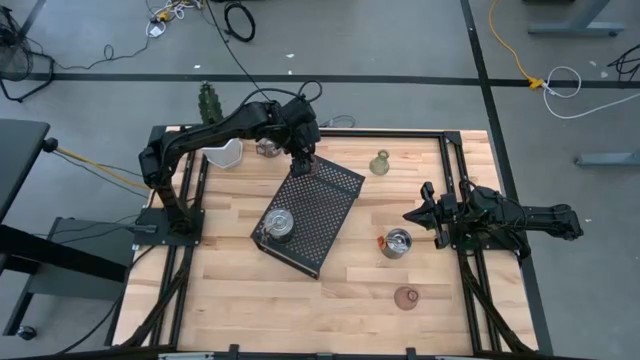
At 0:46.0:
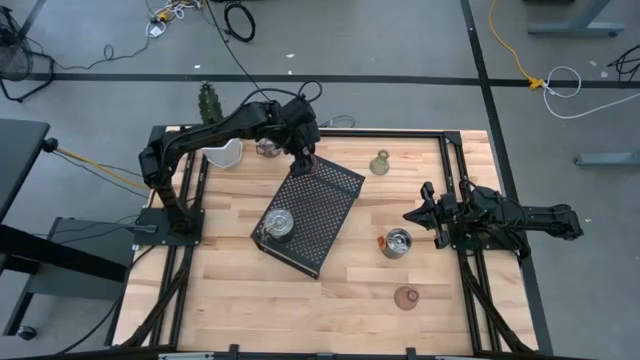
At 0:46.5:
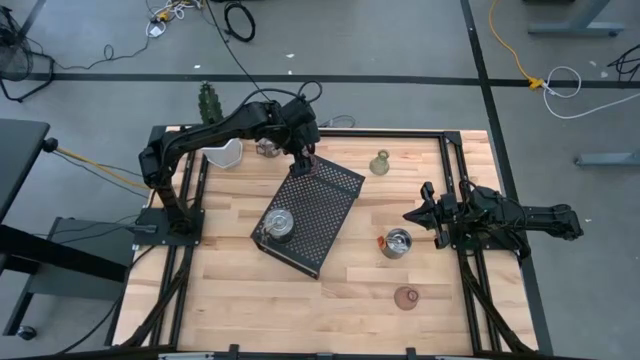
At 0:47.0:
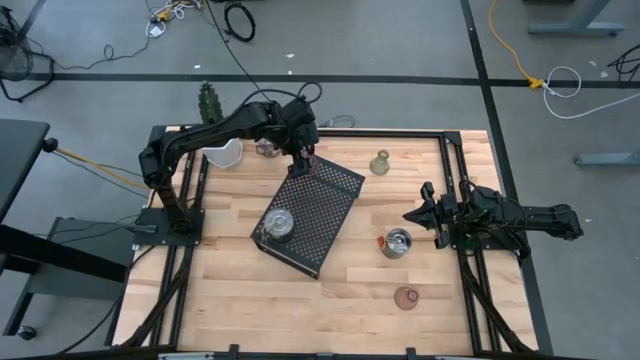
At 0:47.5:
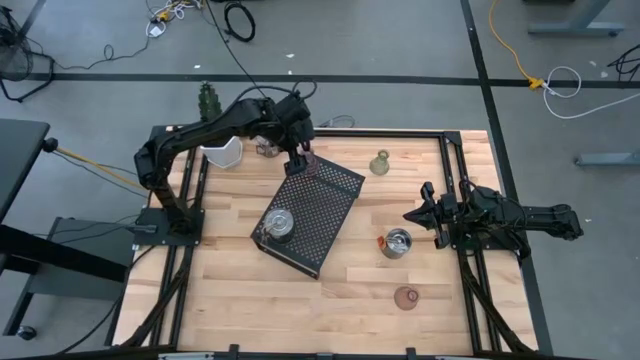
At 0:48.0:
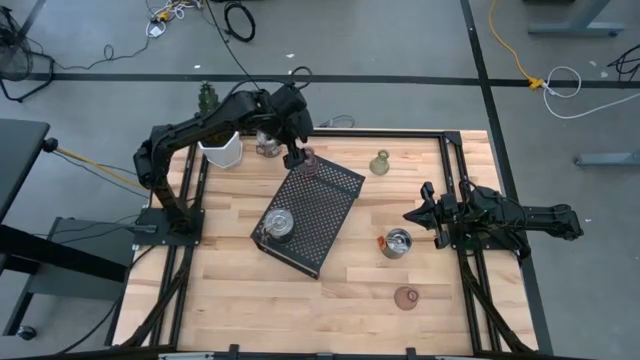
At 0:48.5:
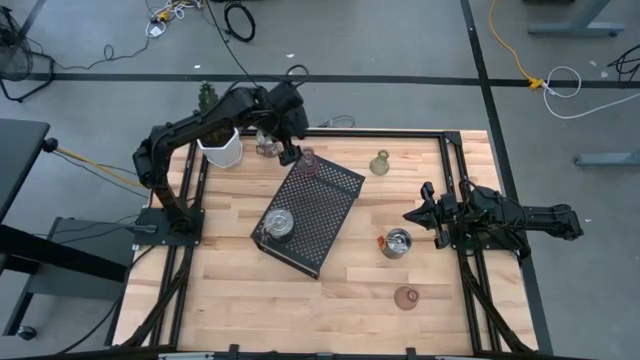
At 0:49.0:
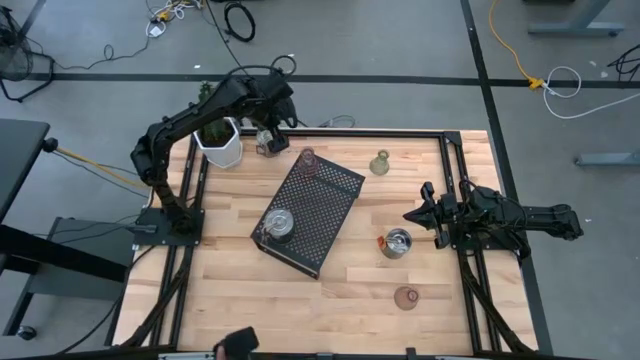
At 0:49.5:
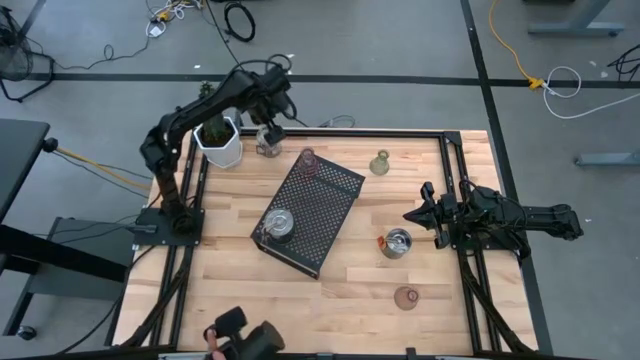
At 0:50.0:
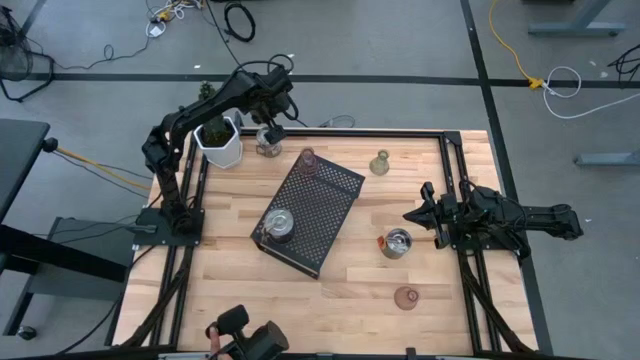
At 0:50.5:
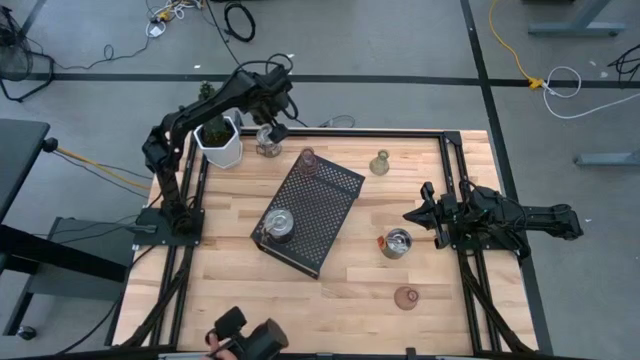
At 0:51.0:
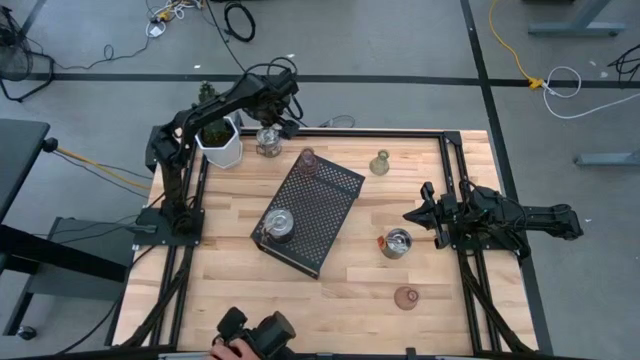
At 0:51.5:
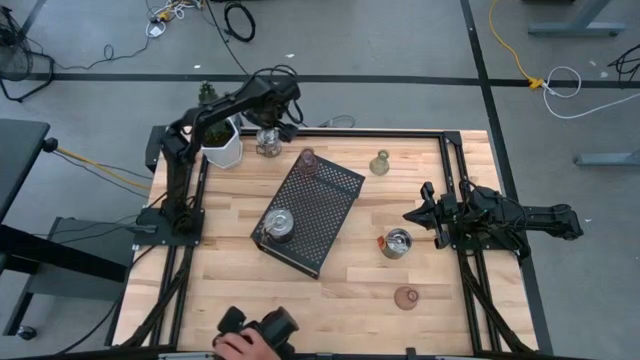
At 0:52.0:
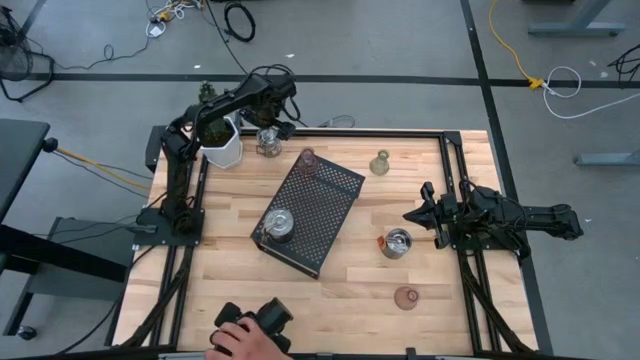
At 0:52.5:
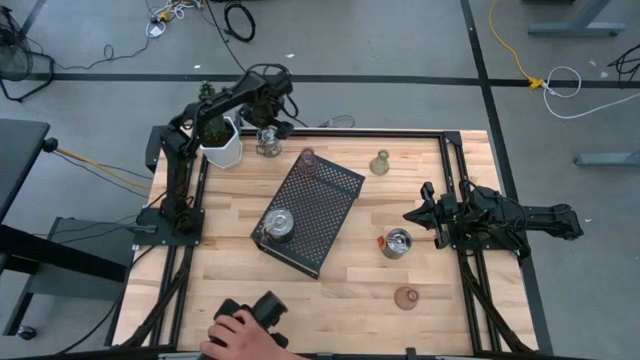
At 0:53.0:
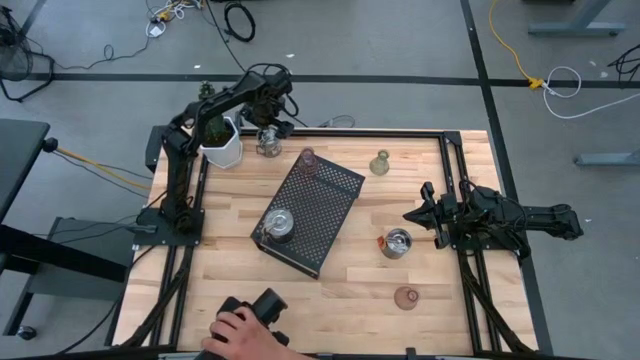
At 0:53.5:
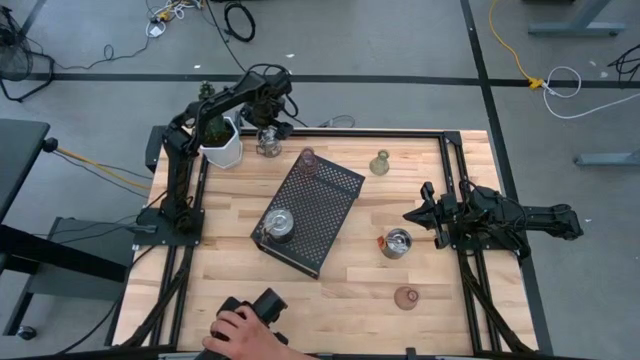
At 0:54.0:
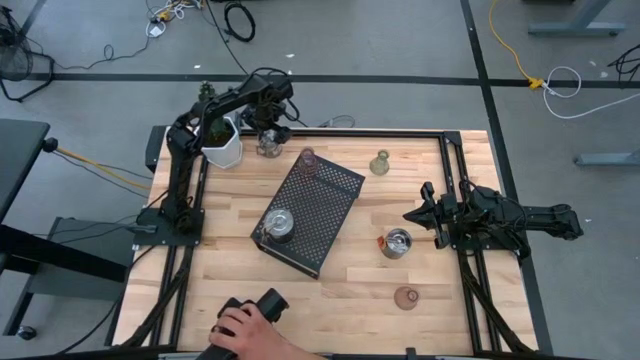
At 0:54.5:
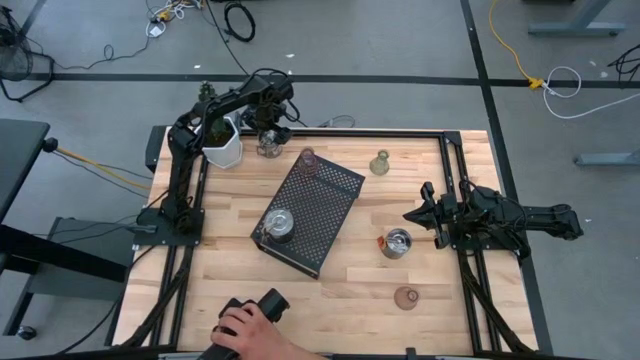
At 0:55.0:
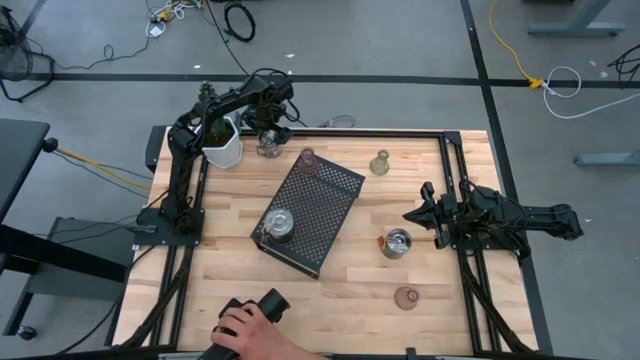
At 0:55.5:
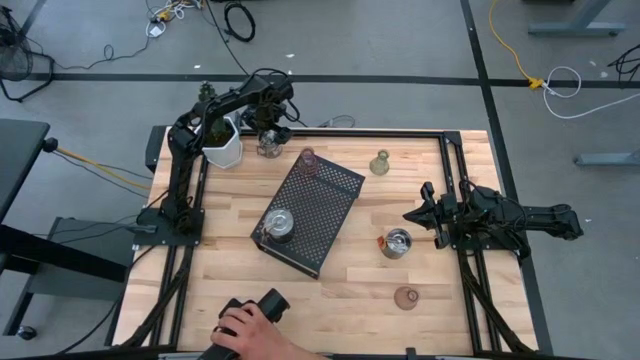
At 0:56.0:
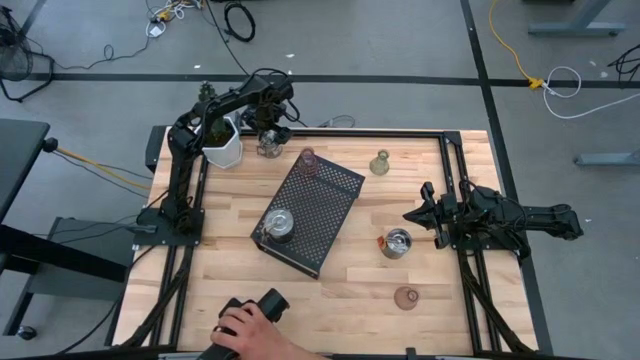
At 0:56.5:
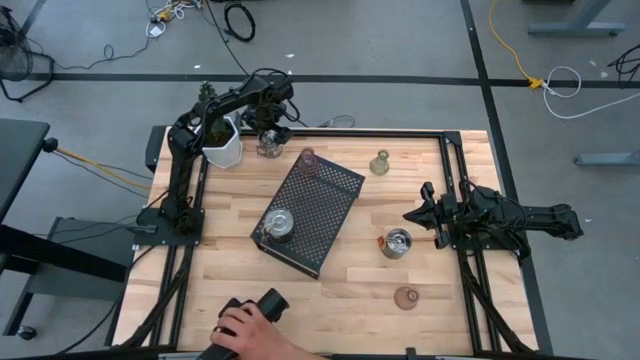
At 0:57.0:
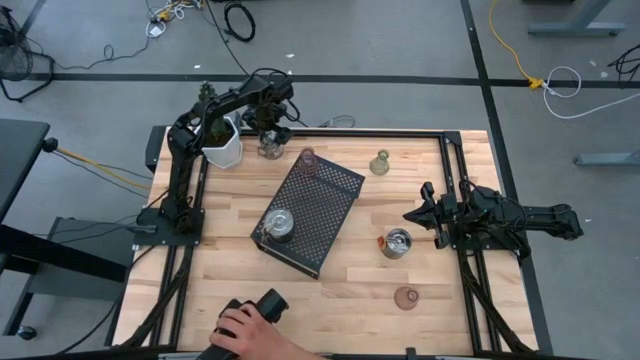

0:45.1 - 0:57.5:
Task: Pick & Place candle stick holders
Put the top silver scented candle on the shelf

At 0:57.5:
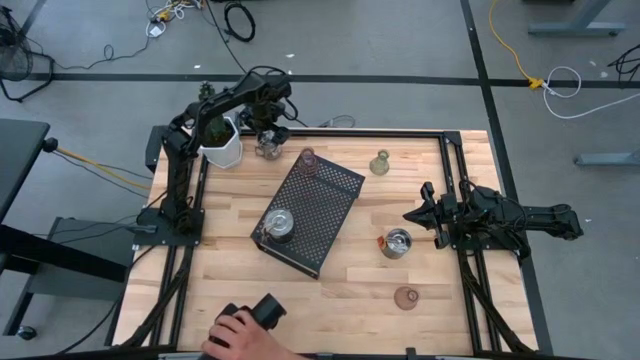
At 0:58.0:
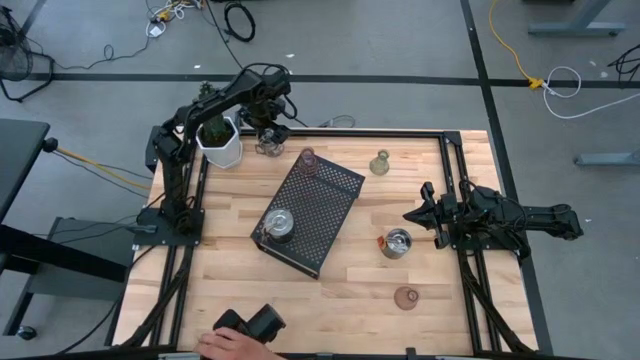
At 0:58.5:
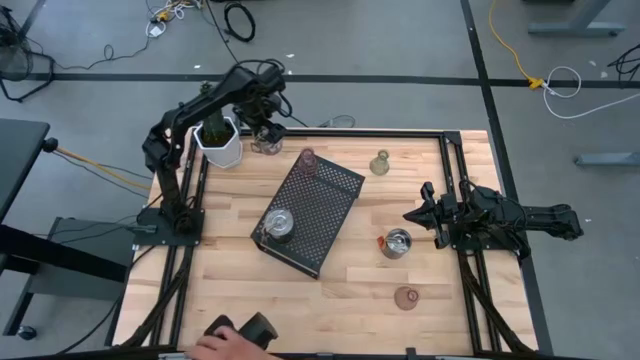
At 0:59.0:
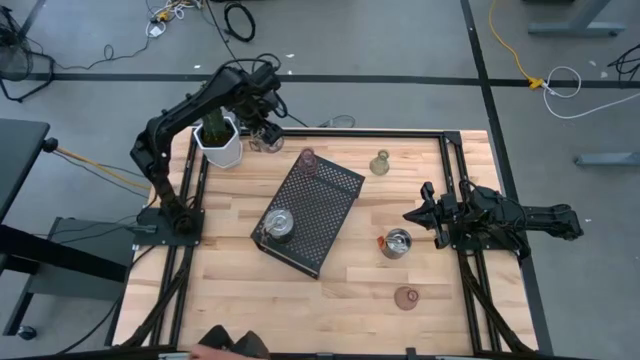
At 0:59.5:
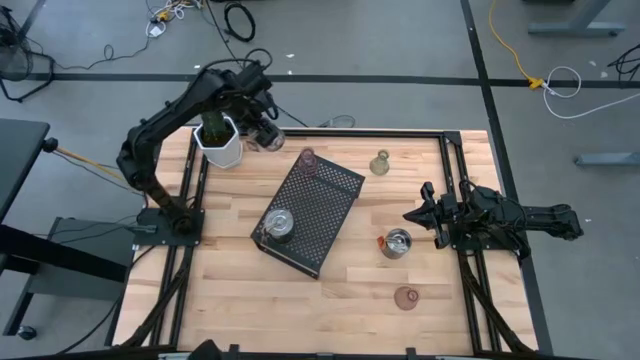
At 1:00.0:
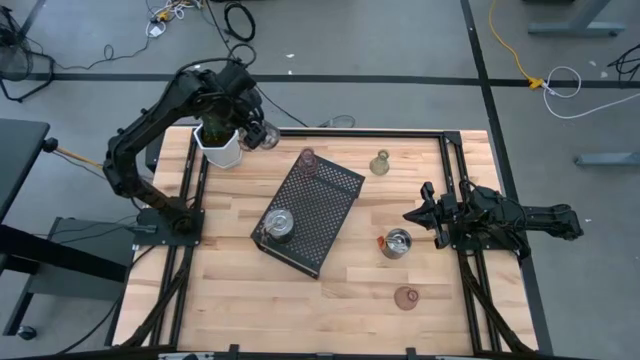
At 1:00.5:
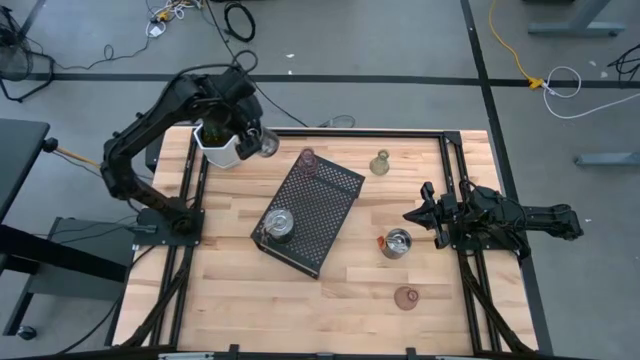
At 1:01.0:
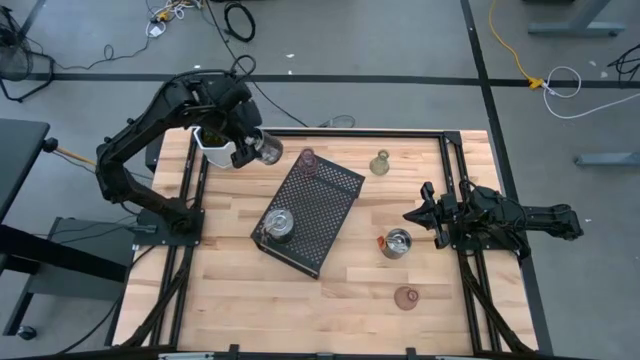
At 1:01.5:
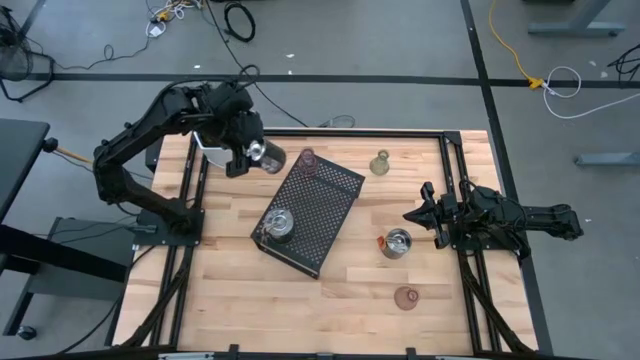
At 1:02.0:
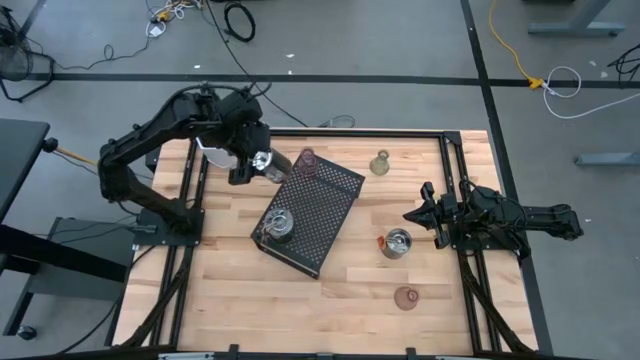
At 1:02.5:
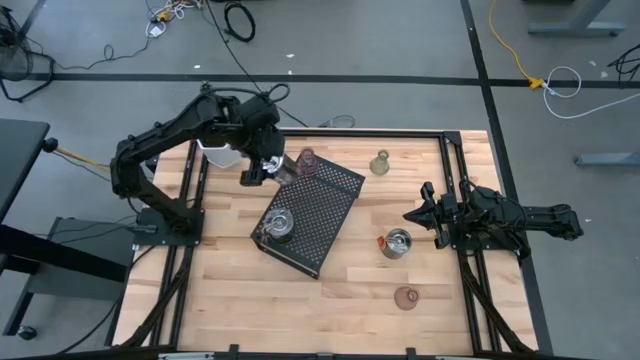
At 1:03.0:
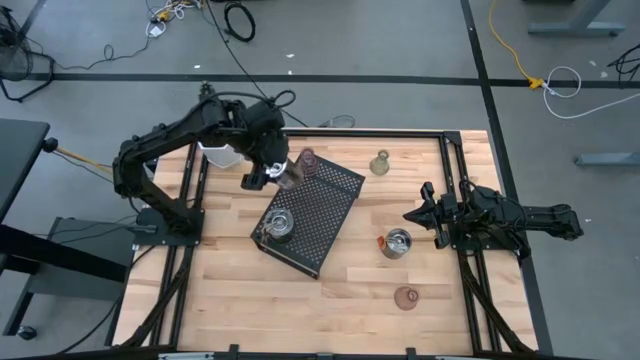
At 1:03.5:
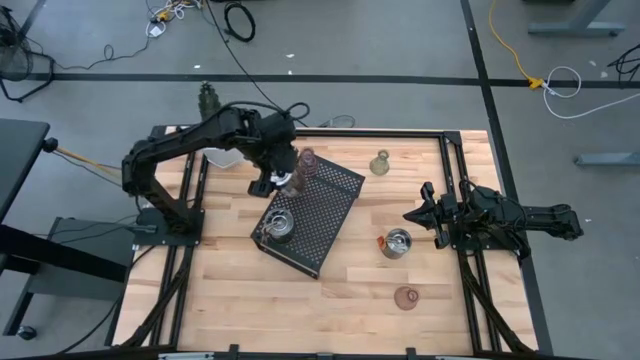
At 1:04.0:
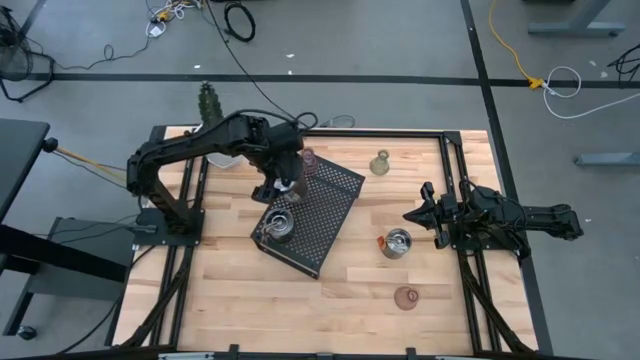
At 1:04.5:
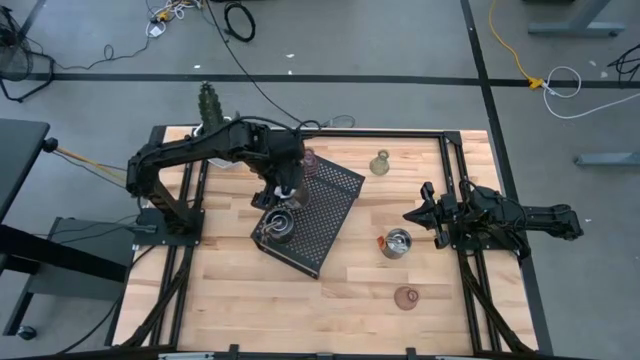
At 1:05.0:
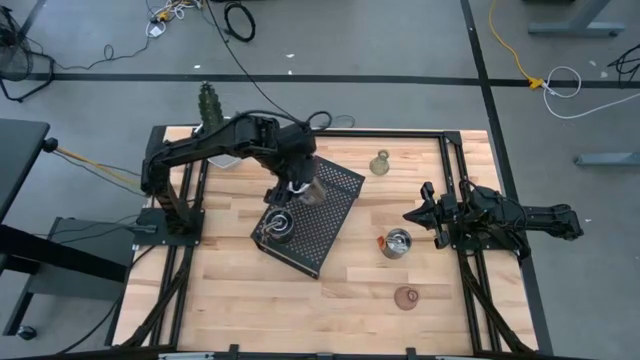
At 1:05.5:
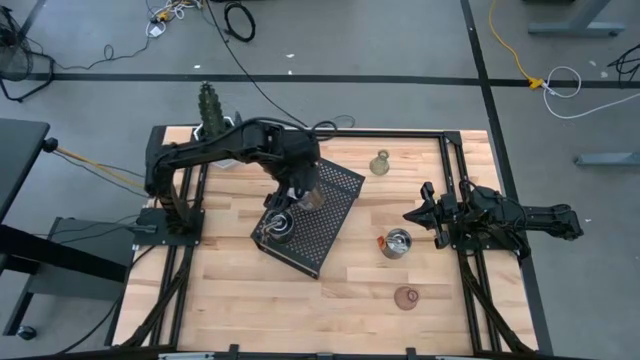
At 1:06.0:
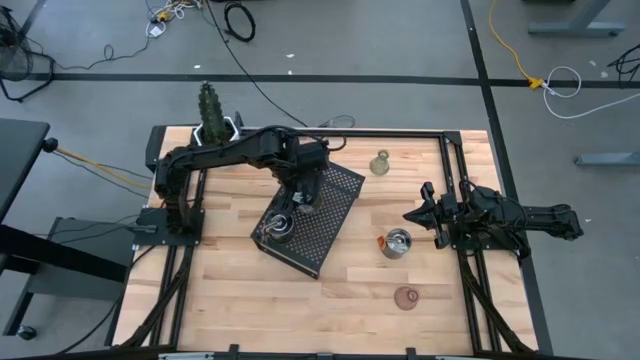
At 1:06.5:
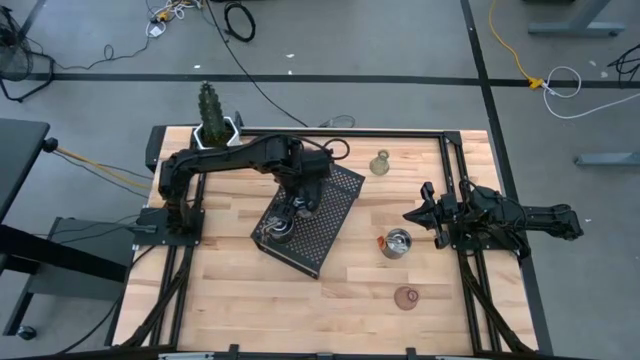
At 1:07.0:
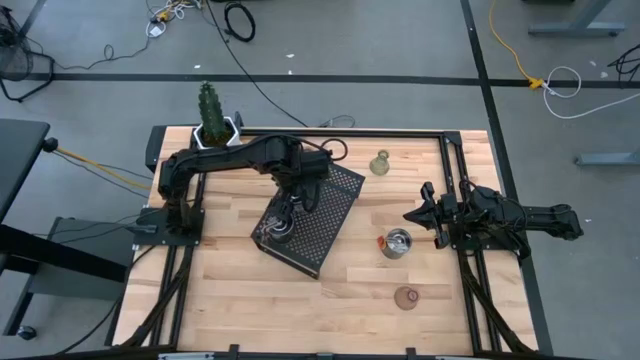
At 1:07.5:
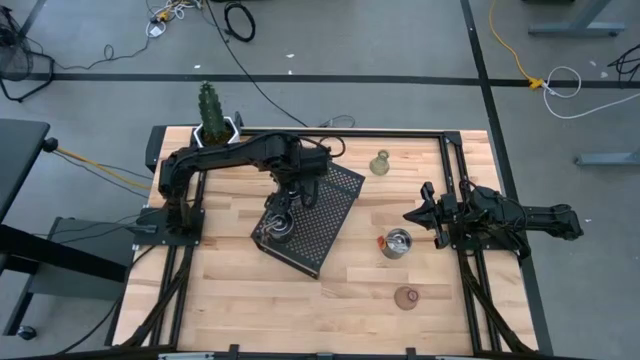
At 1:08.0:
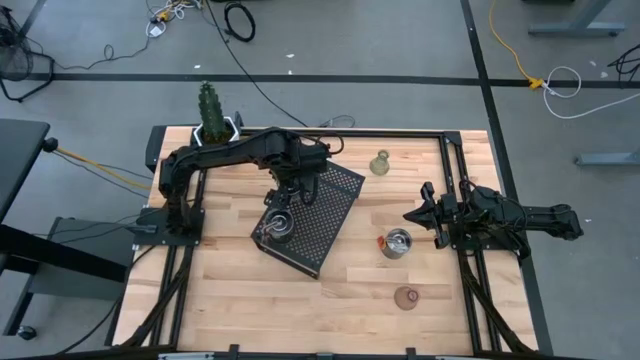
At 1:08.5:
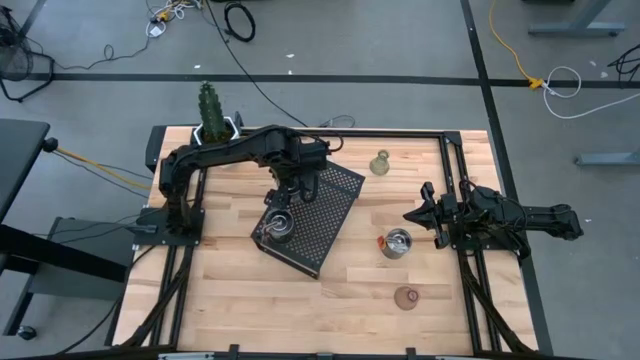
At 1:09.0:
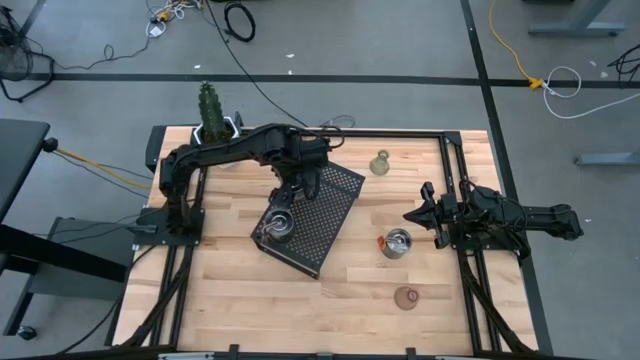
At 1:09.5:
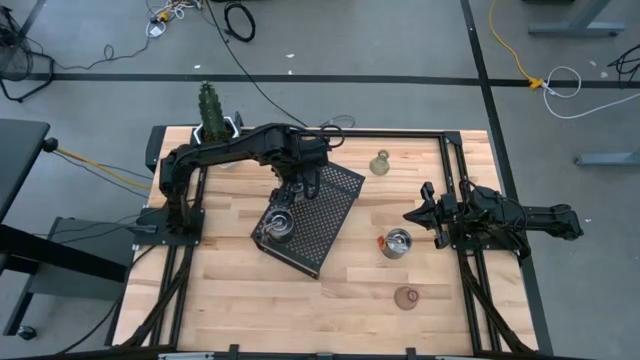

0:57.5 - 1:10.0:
Put the top silver scented candle on the shelf
